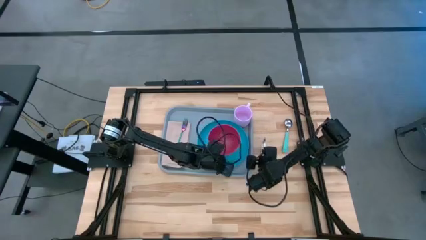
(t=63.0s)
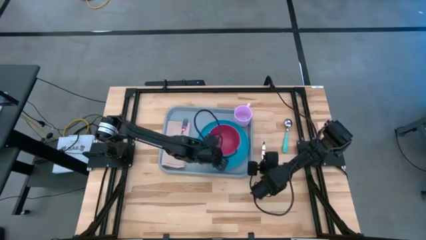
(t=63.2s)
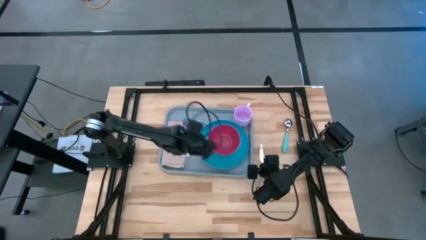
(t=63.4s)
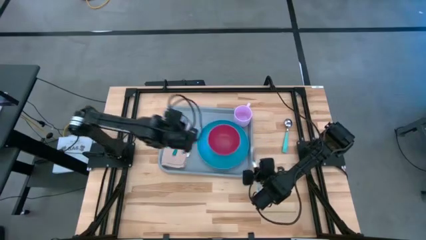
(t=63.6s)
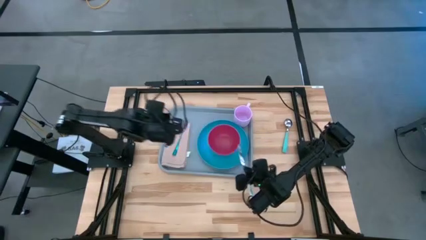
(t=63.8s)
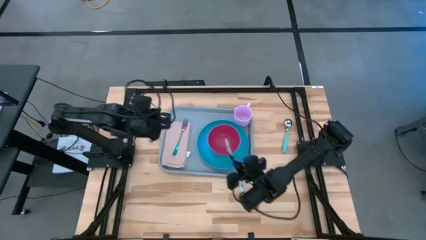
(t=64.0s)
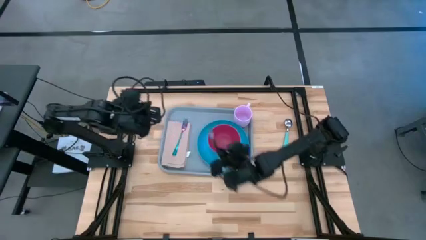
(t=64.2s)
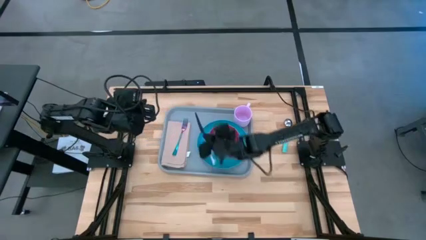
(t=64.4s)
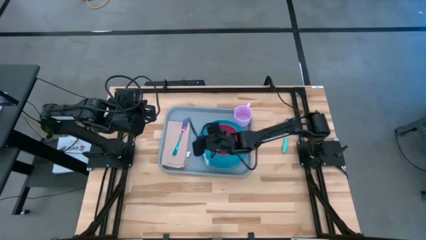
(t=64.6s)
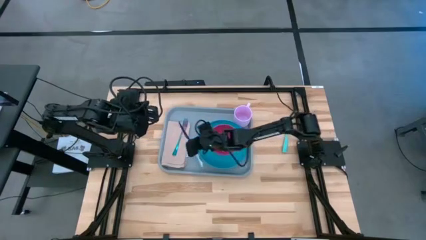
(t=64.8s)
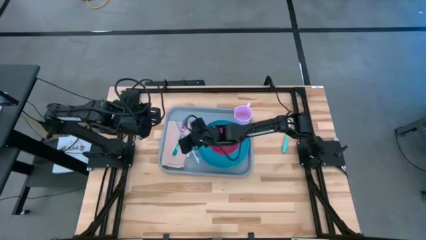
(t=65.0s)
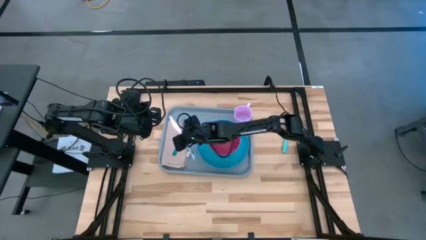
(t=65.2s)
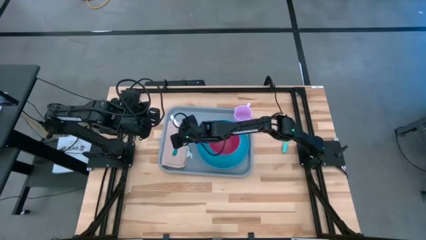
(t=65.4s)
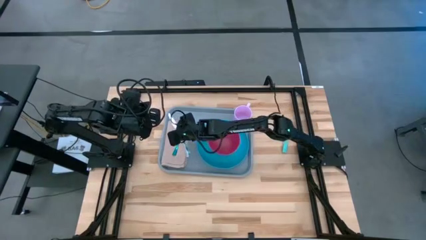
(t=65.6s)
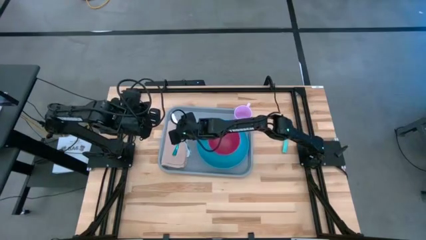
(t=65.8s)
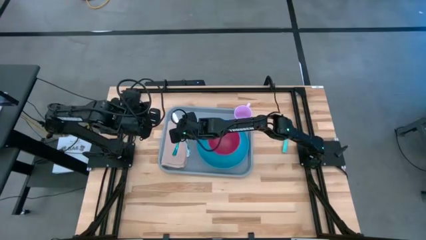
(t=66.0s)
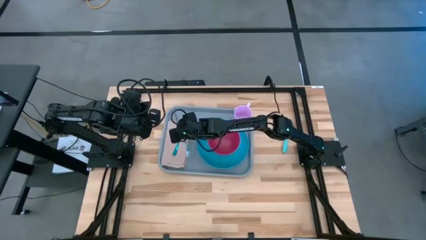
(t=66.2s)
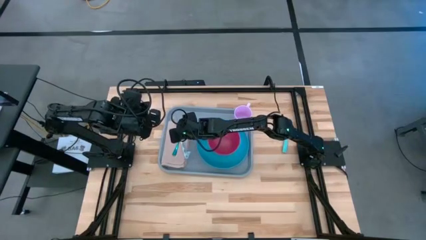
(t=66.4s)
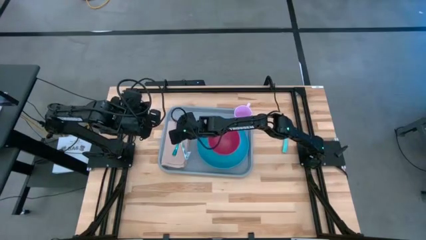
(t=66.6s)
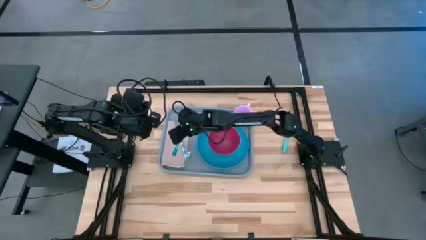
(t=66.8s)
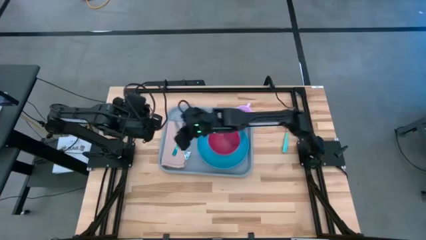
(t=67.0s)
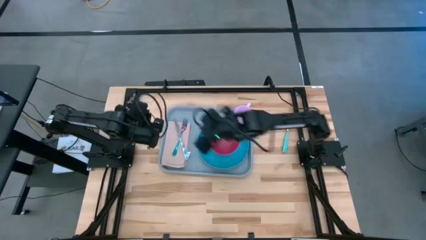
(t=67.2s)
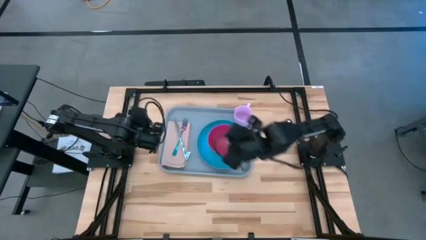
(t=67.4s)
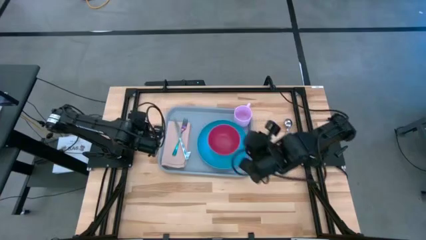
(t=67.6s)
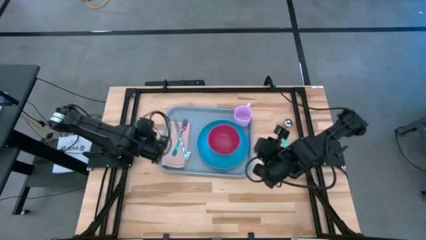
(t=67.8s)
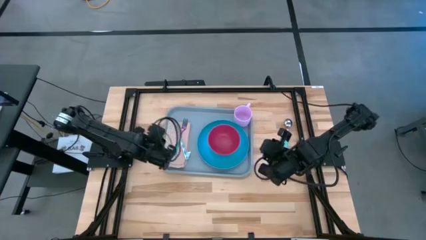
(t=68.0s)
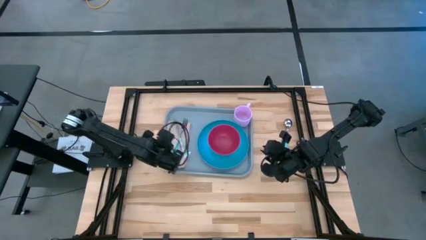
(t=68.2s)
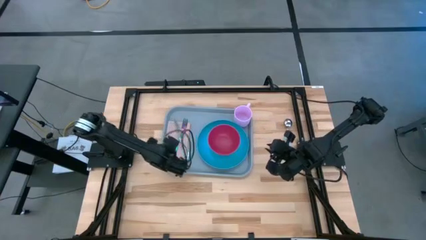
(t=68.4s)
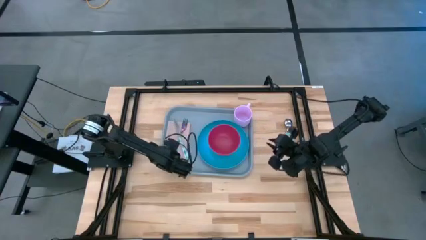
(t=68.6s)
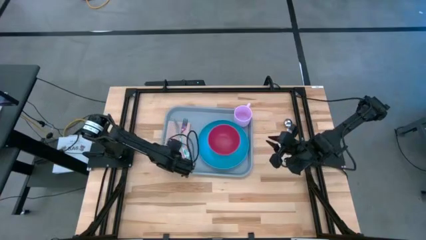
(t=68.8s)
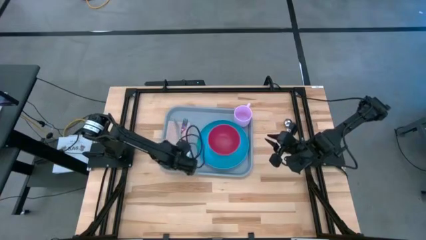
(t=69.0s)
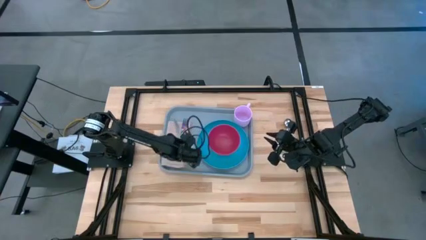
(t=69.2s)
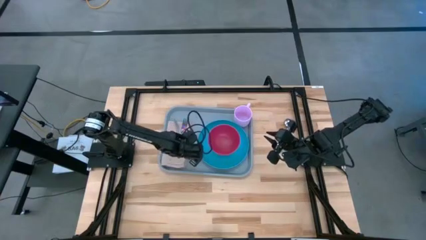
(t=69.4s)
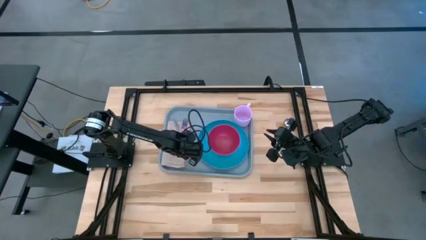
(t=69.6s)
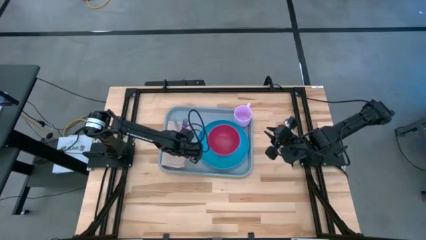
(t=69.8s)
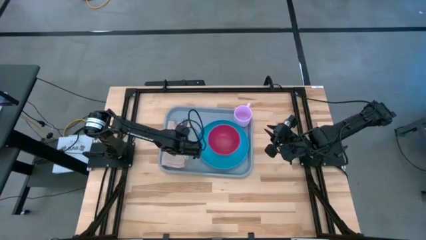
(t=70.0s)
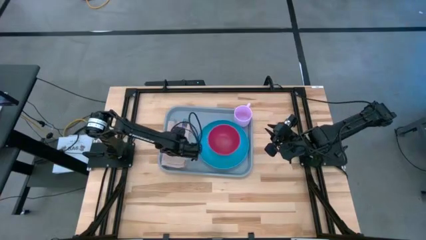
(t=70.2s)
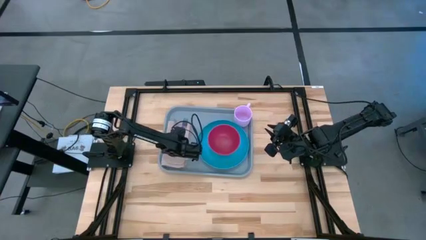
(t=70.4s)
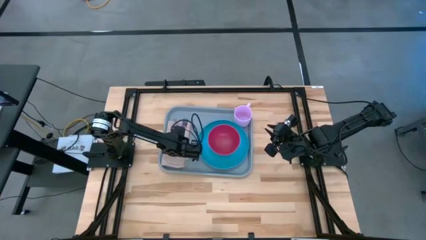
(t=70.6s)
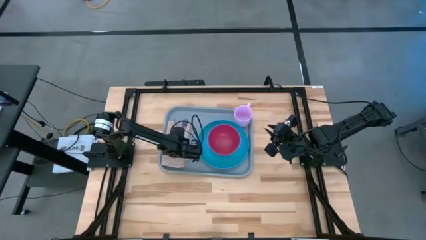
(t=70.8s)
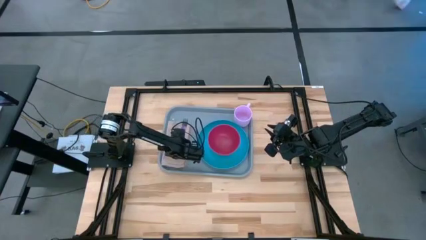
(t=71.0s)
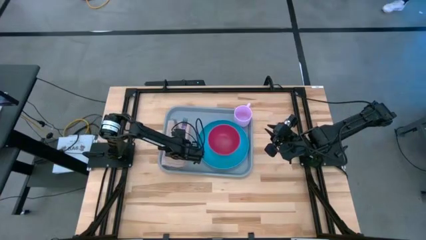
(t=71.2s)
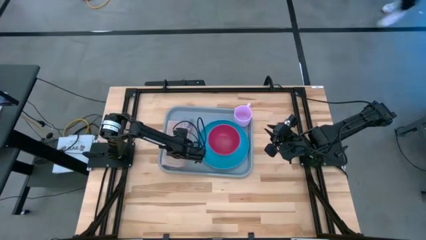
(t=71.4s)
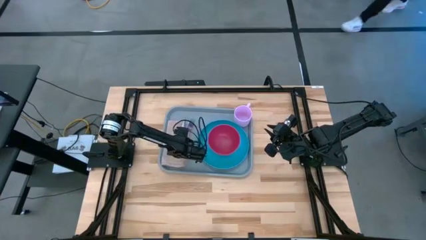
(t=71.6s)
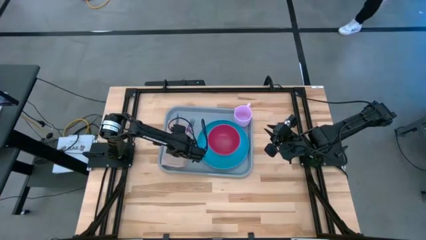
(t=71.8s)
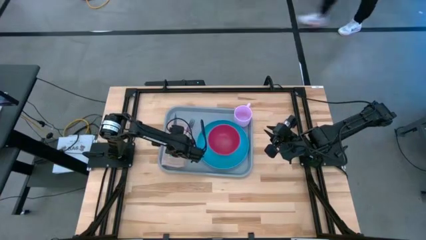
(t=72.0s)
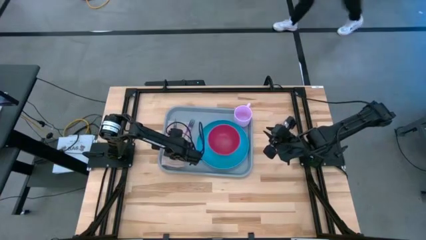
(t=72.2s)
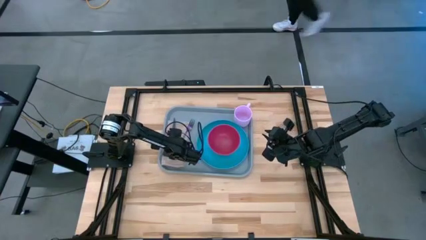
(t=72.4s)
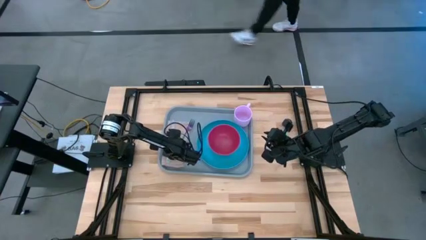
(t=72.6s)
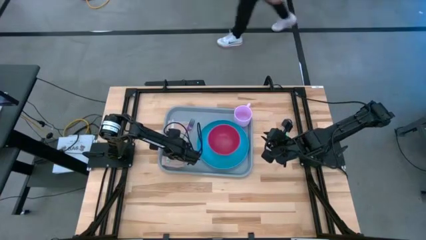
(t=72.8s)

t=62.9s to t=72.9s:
Task: Set up tray
Put the white knife on the brown napkin to the left of the fork

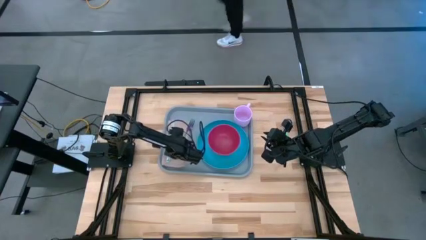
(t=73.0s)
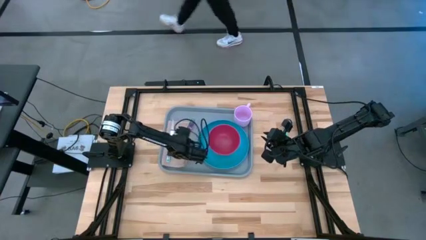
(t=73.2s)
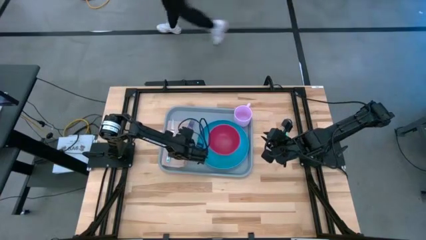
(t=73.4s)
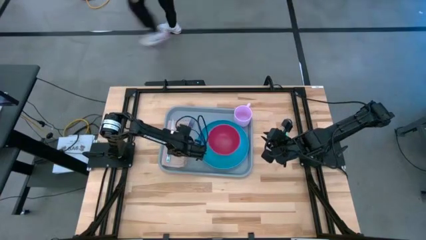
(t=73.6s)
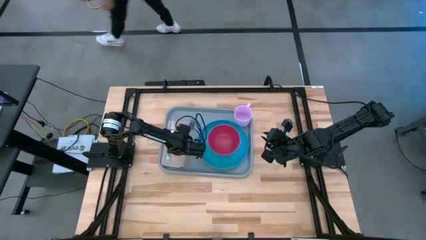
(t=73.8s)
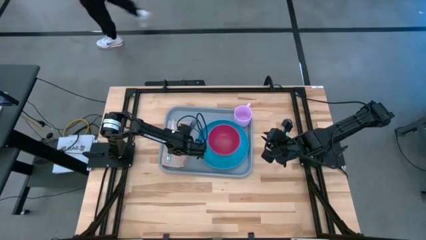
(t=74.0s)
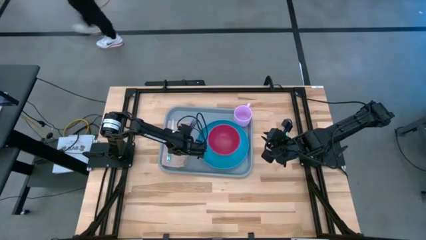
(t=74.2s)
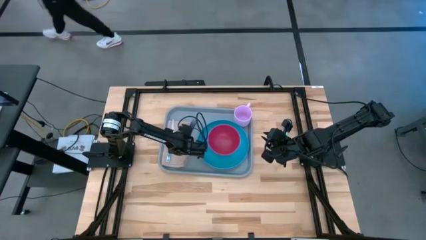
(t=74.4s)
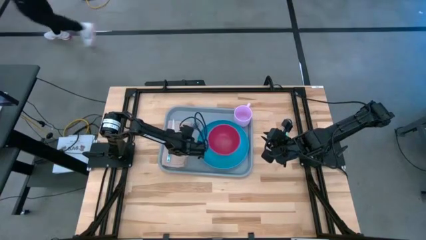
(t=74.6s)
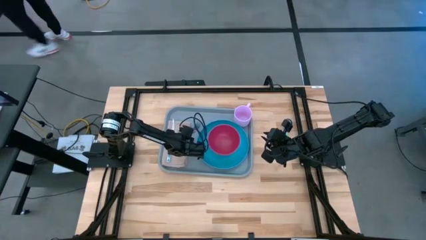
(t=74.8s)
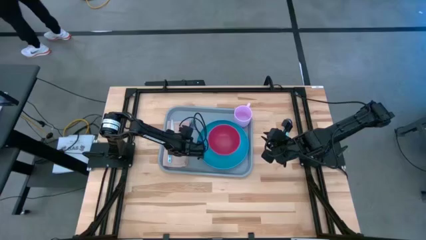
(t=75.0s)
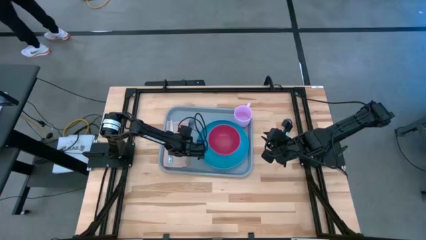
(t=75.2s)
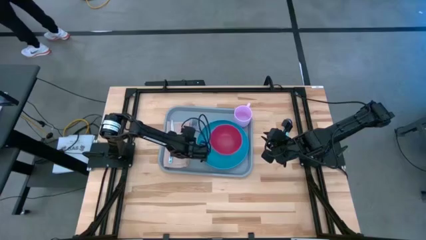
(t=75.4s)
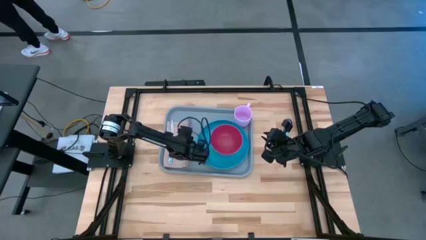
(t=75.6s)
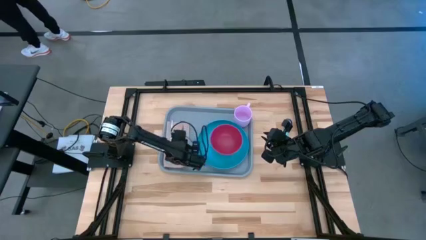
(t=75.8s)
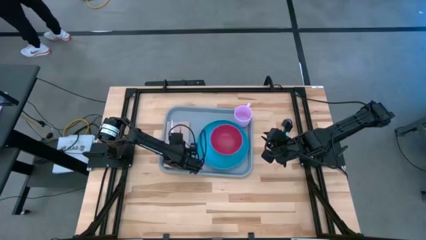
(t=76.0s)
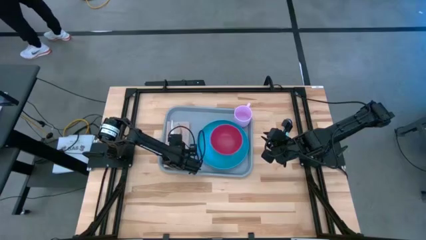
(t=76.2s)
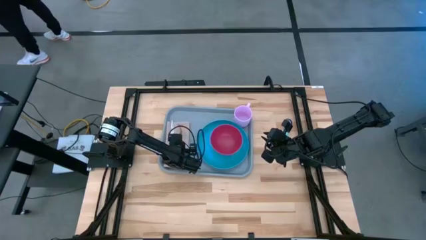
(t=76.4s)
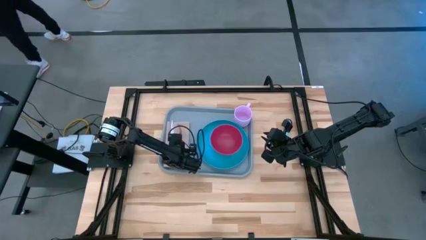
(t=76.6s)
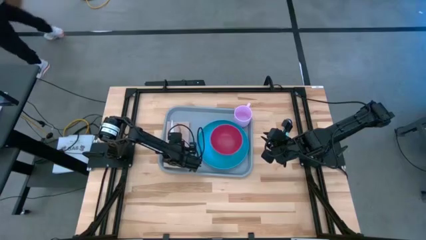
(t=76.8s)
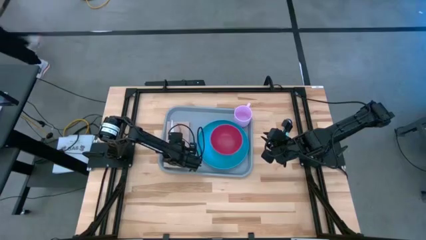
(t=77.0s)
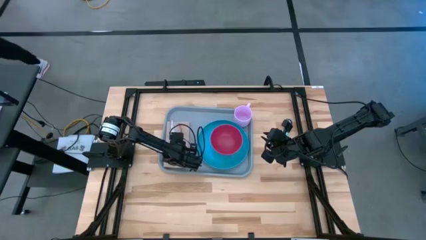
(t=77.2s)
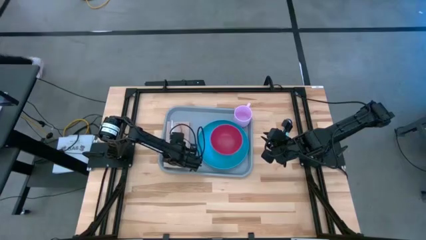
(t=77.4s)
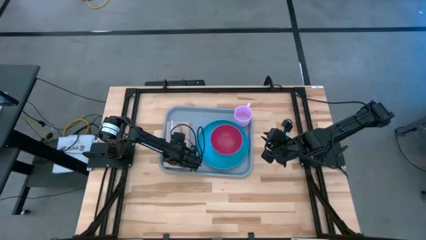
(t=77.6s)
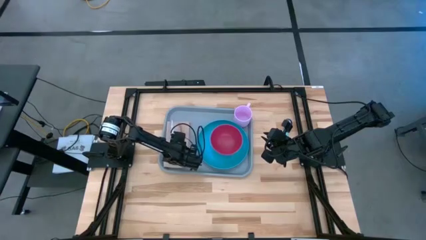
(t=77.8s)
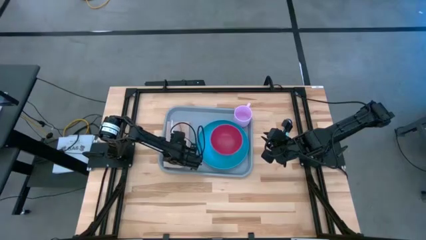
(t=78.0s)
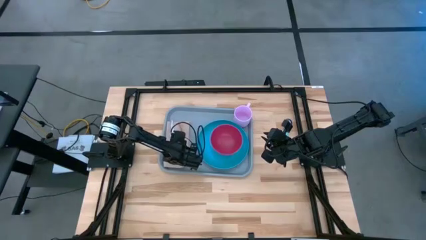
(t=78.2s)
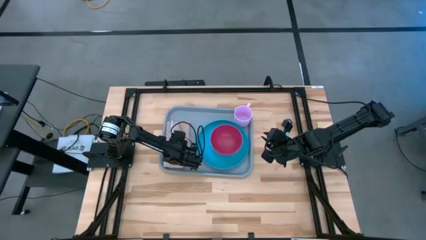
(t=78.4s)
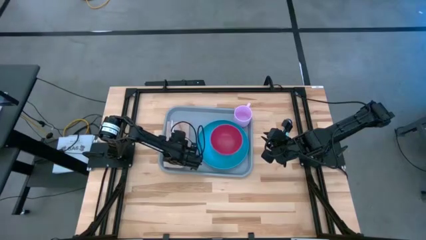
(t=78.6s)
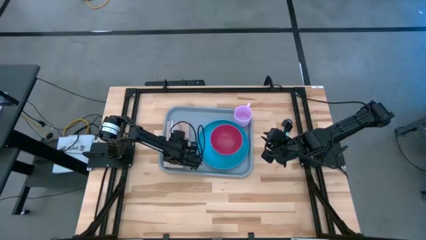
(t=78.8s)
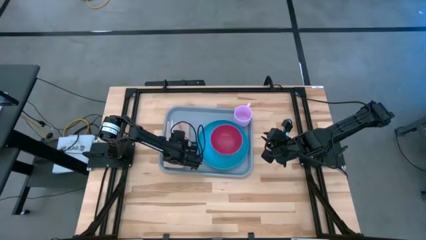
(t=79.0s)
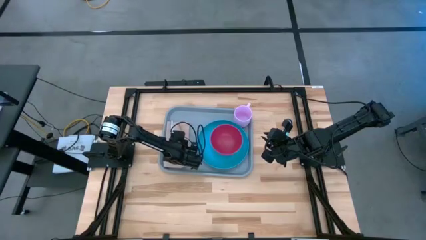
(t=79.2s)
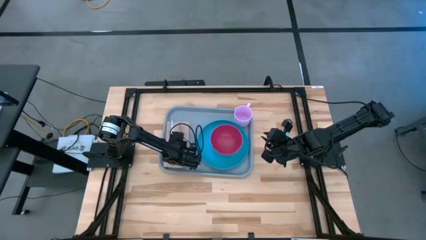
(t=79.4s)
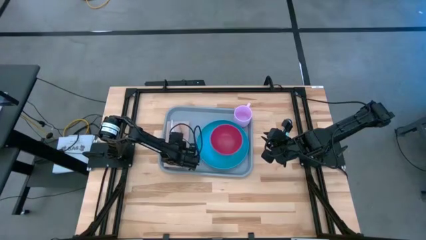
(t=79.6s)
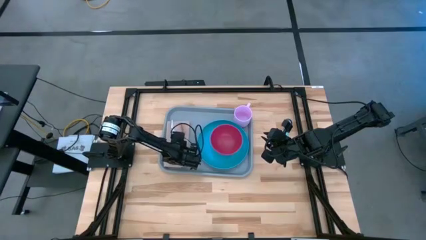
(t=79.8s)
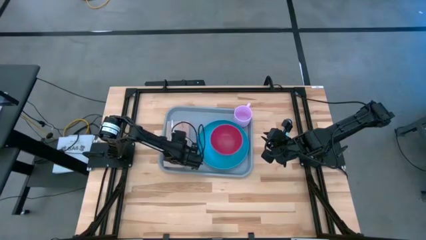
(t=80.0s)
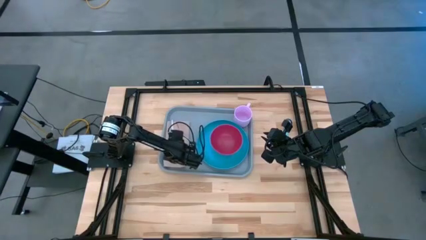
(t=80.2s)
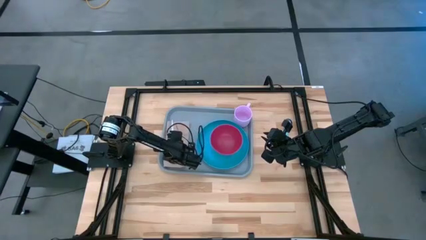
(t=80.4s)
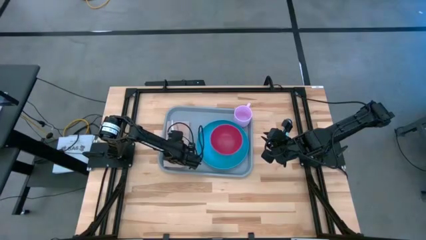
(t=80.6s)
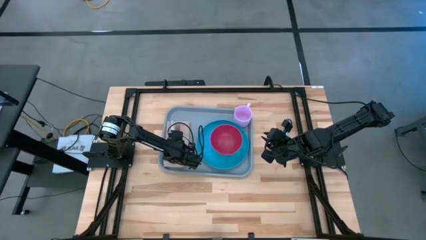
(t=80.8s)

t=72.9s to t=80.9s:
Adjust the fork on the brown napkin
